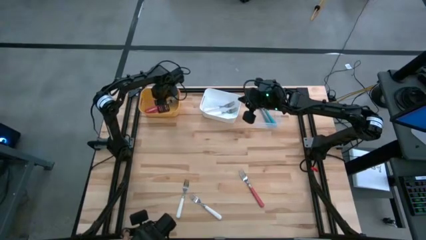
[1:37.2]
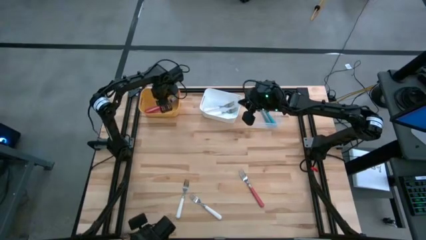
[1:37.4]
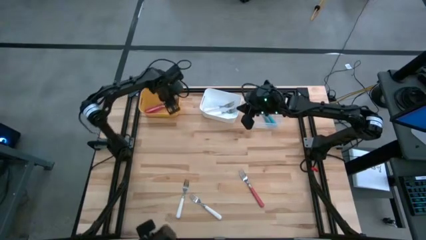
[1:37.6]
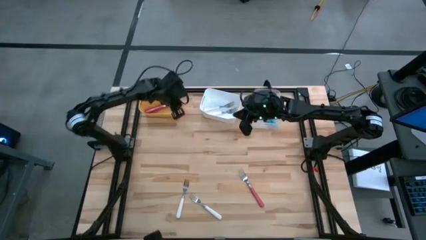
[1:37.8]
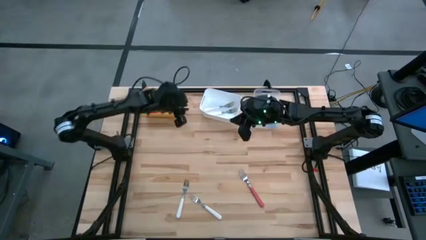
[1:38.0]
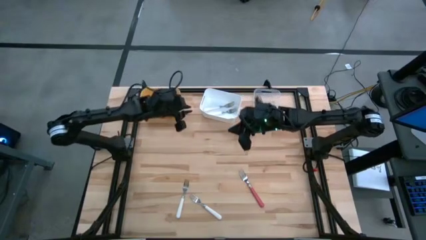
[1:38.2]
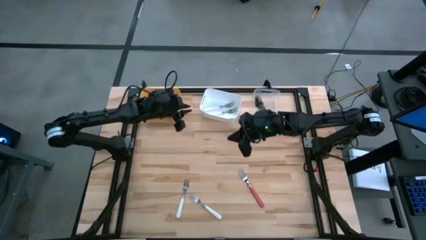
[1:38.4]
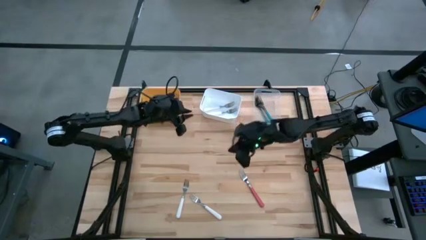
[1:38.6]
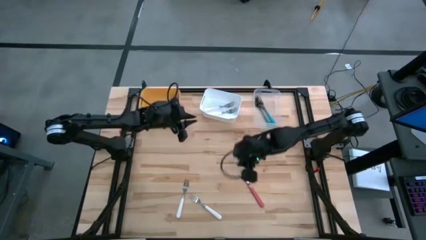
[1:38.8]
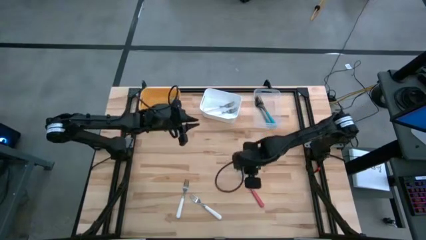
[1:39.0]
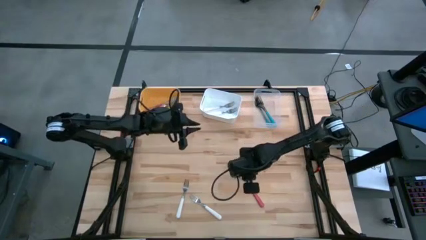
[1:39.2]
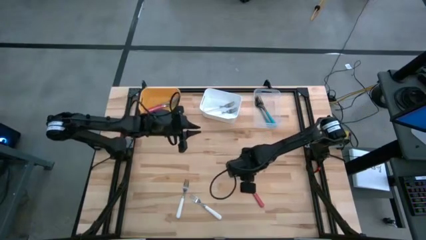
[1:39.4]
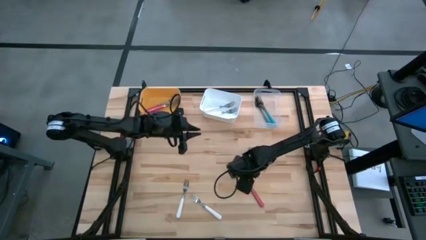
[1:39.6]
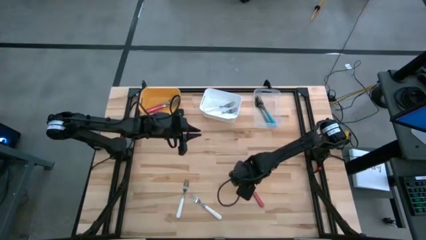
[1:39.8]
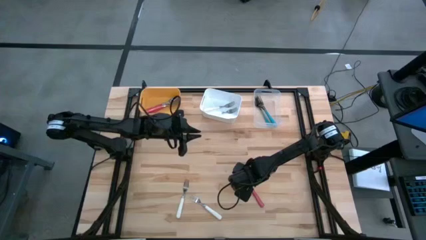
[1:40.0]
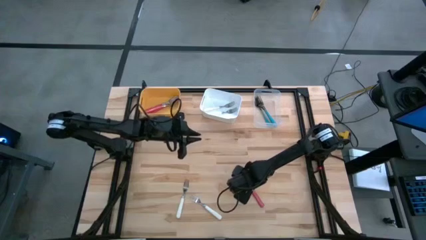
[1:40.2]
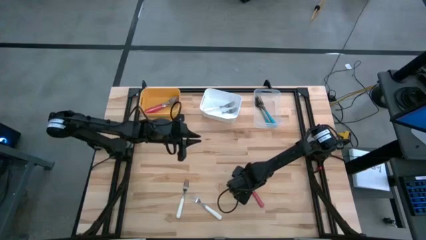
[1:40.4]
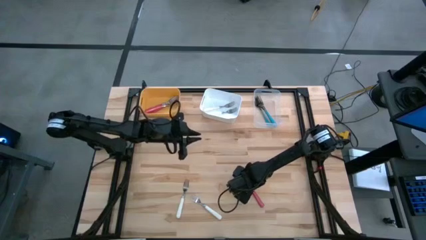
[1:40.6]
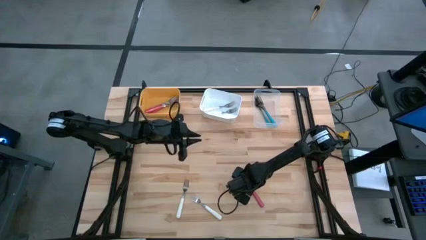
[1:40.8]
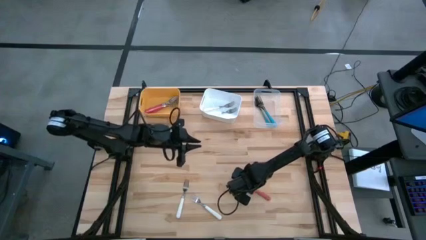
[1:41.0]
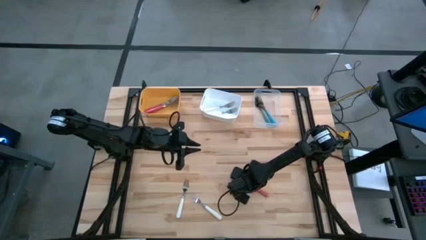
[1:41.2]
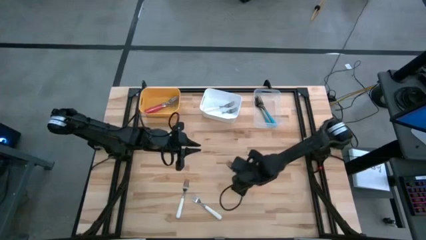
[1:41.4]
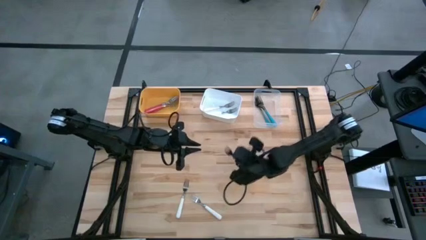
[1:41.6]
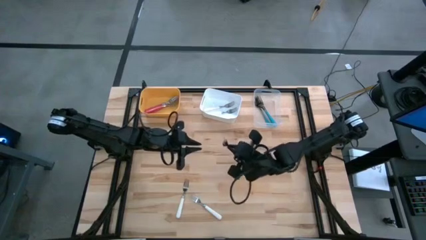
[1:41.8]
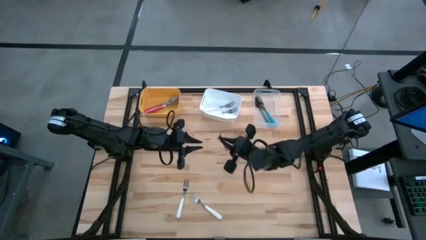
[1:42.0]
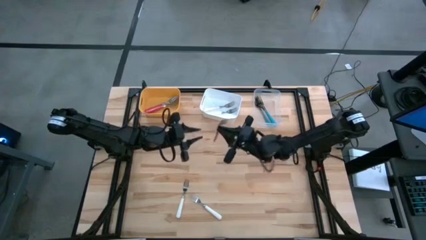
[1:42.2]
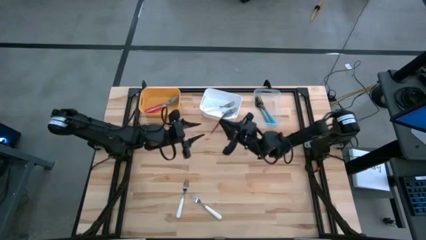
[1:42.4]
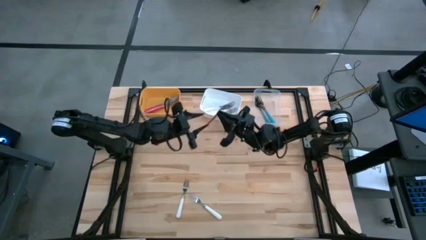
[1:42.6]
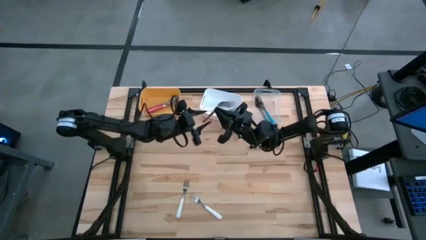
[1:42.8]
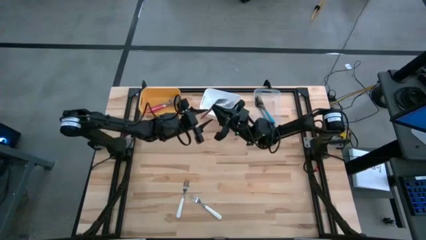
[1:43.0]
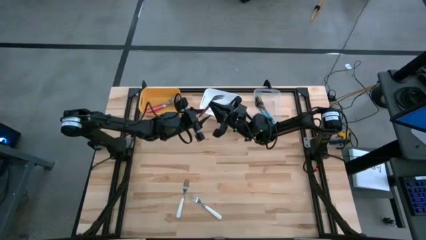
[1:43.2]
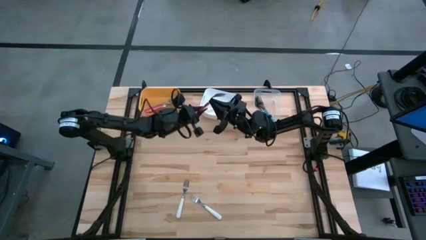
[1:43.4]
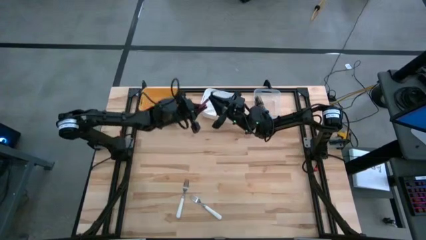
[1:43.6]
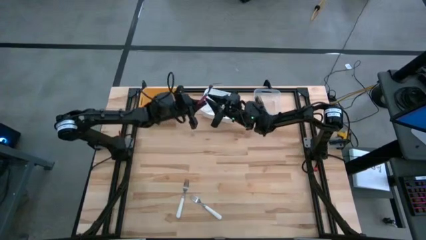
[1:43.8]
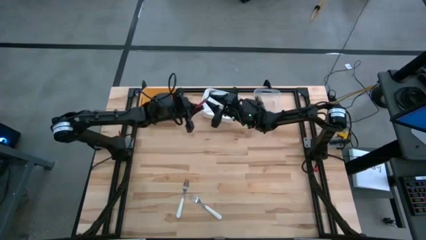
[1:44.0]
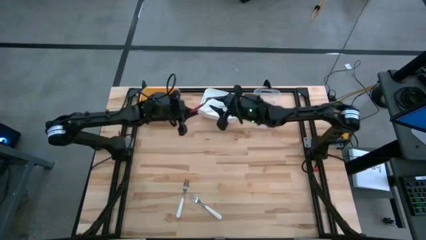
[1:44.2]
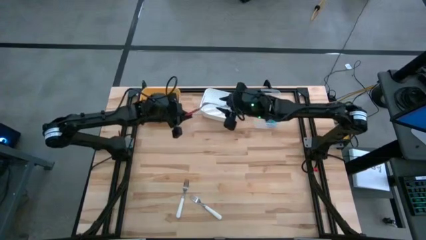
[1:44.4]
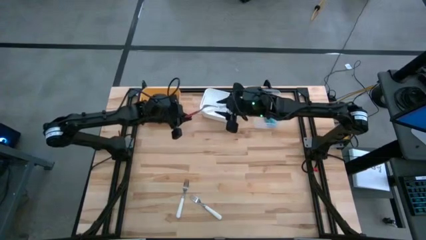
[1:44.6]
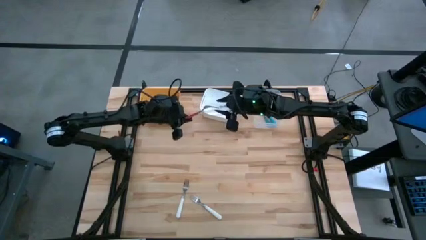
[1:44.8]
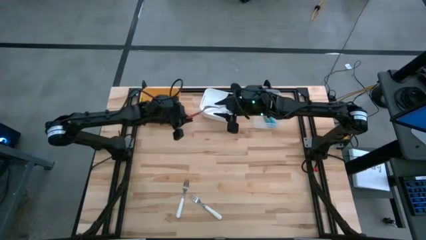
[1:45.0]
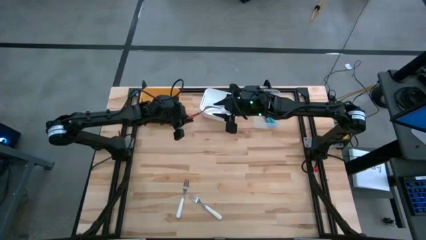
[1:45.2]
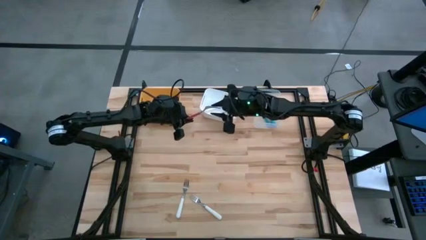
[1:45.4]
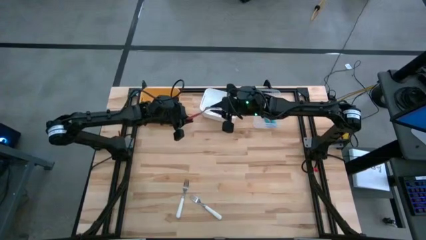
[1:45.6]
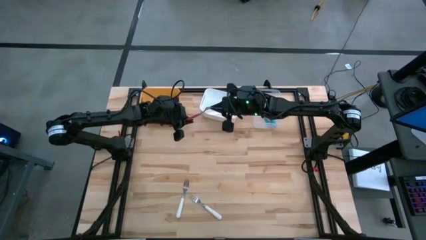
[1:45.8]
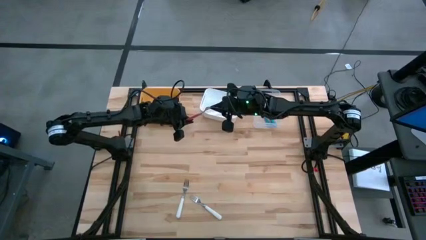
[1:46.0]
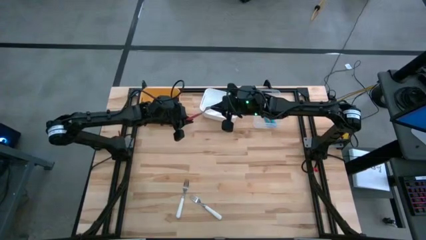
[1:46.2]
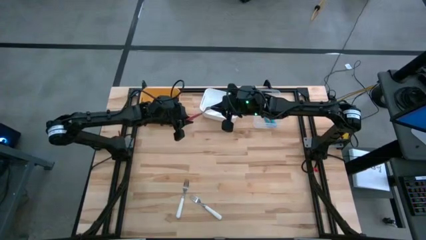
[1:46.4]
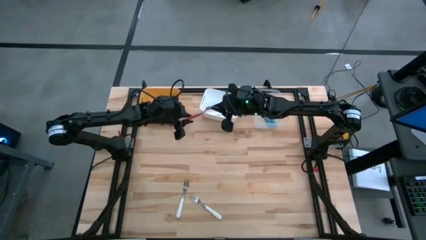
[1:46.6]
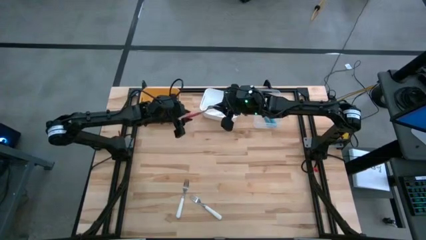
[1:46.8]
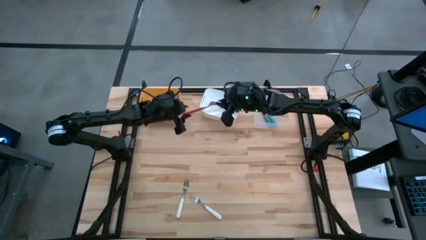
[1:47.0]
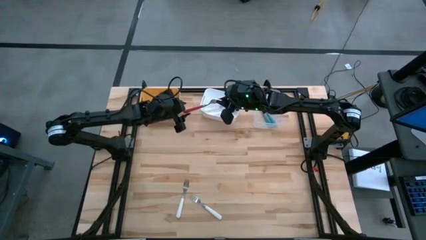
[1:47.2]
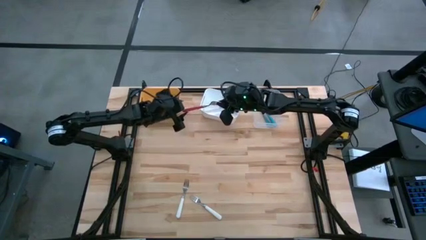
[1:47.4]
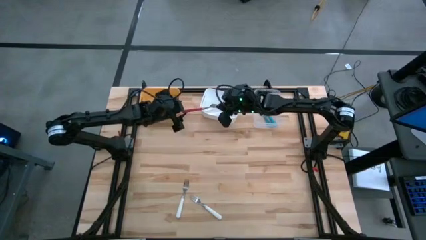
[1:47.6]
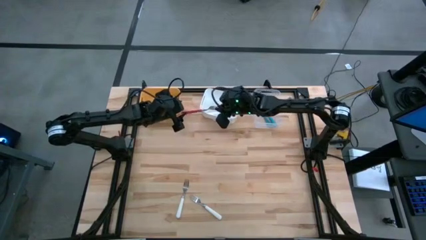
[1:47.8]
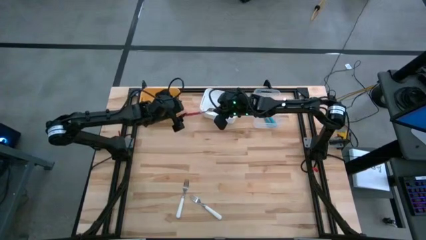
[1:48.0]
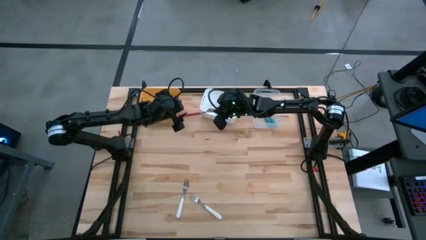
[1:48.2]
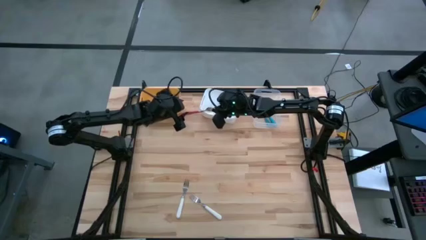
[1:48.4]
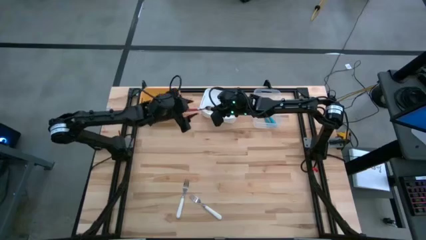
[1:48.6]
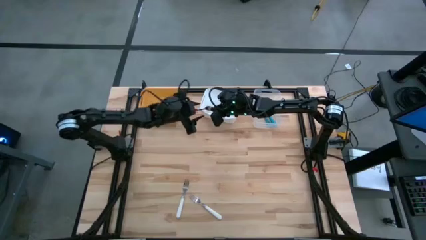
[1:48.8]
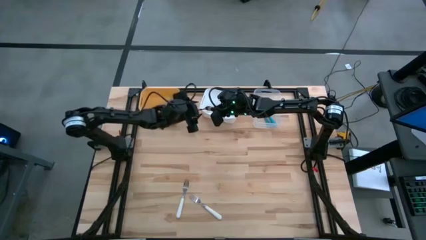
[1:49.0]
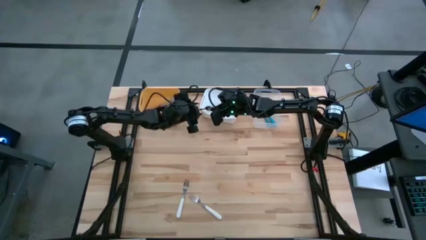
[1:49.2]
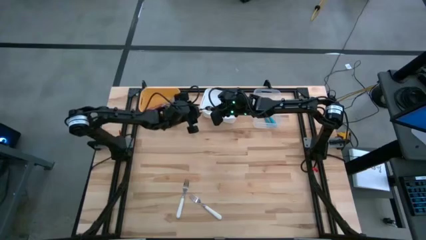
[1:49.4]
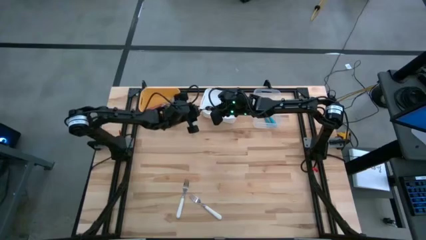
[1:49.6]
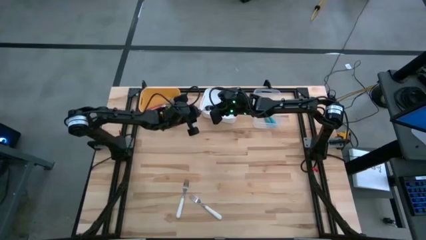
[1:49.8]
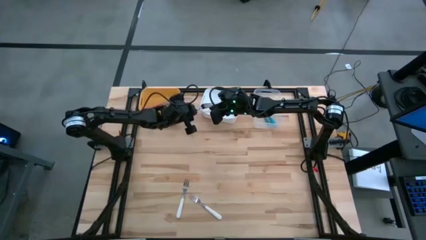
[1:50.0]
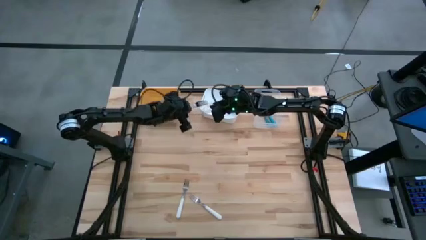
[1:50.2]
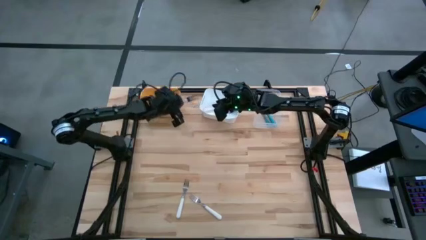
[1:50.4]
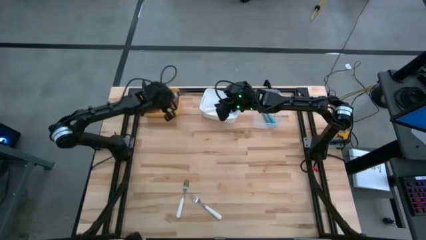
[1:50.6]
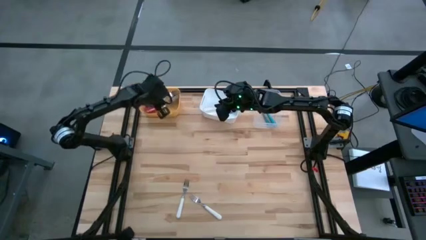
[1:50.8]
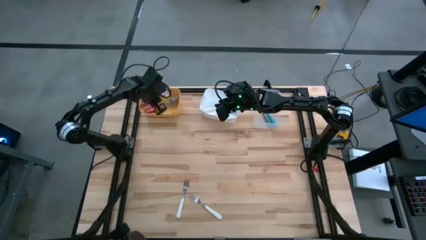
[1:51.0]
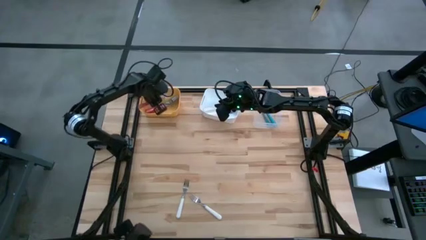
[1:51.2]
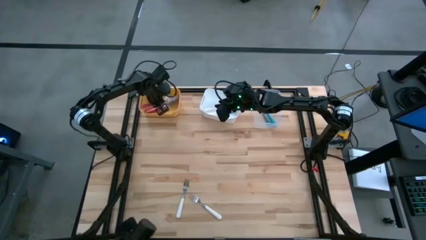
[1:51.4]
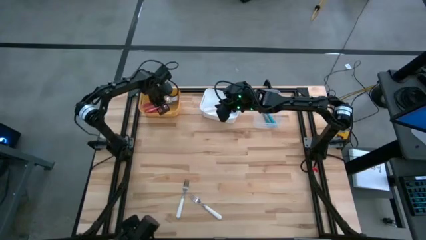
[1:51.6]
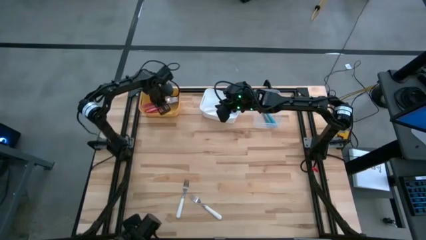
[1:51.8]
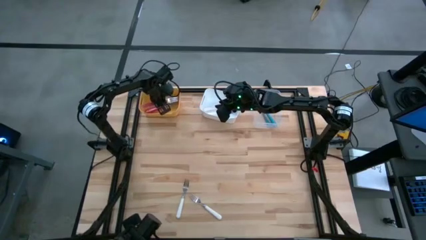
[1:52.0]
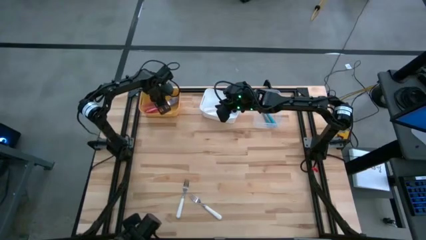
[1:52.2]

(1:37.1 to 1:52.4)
Task: Sort silverware by color (type)
Put the pink fork into the yellow bin
